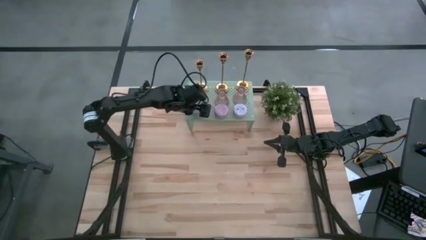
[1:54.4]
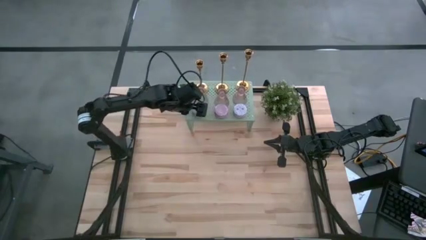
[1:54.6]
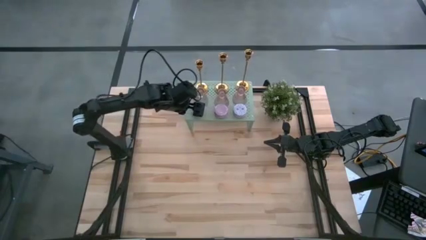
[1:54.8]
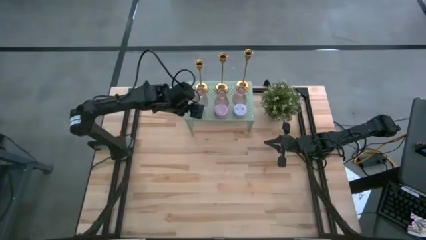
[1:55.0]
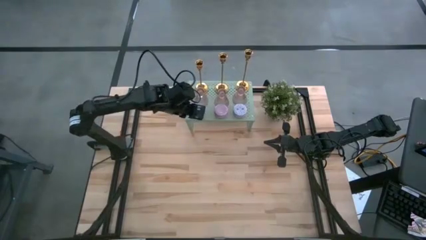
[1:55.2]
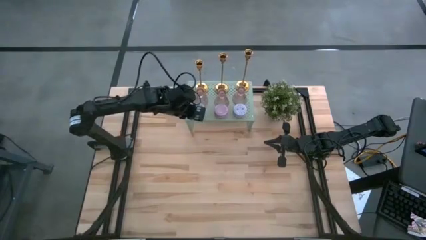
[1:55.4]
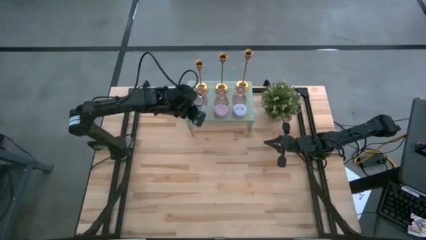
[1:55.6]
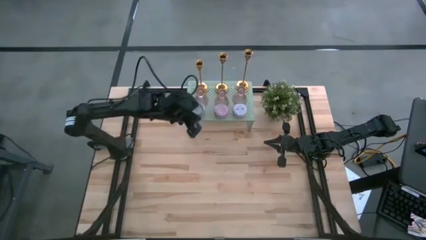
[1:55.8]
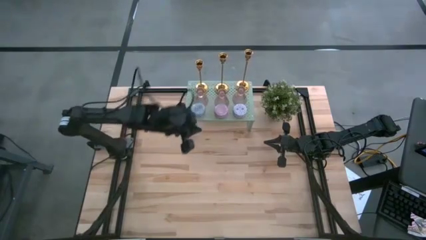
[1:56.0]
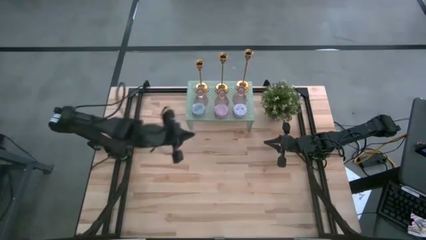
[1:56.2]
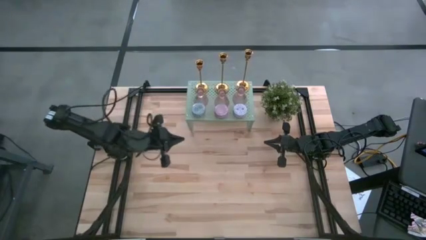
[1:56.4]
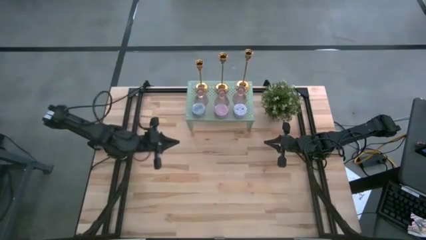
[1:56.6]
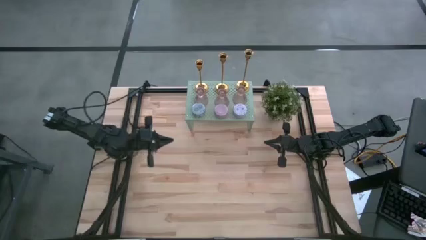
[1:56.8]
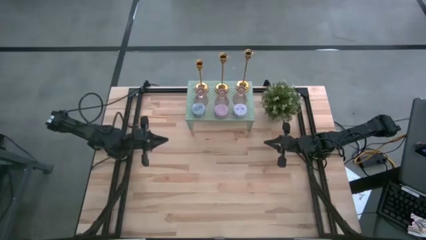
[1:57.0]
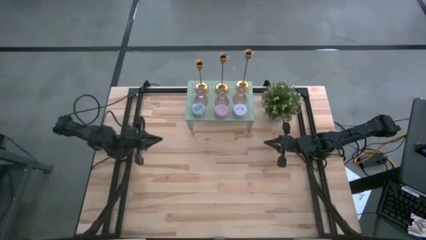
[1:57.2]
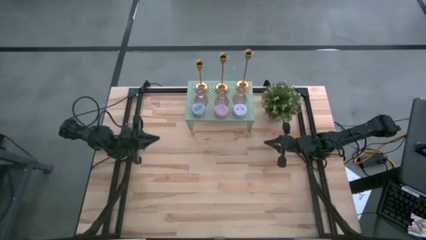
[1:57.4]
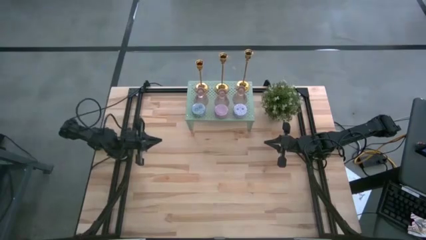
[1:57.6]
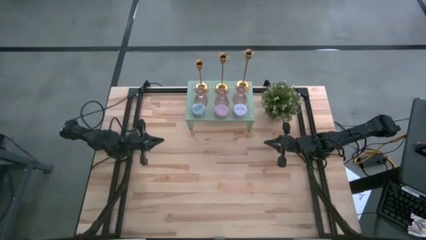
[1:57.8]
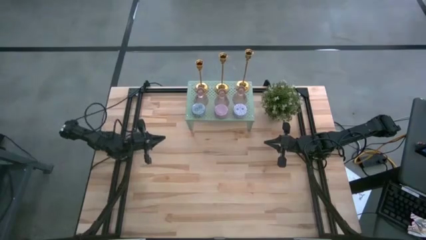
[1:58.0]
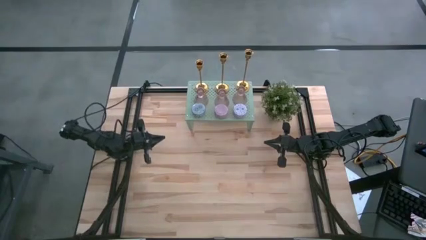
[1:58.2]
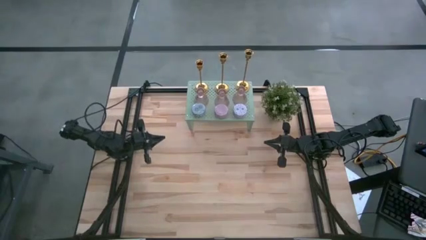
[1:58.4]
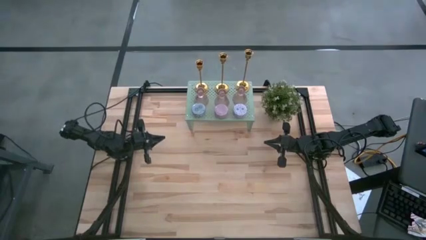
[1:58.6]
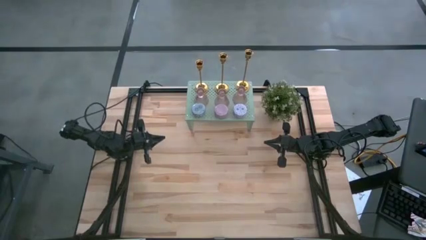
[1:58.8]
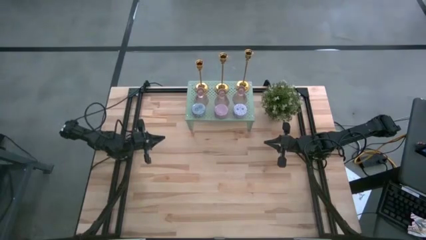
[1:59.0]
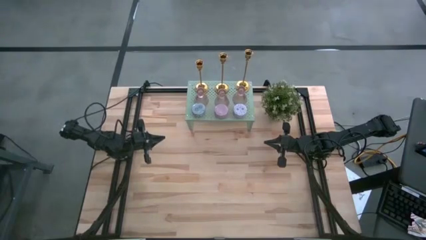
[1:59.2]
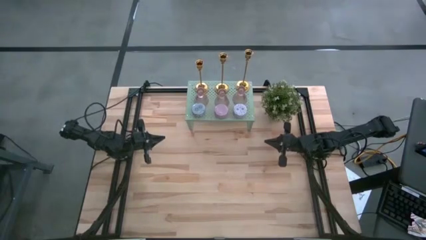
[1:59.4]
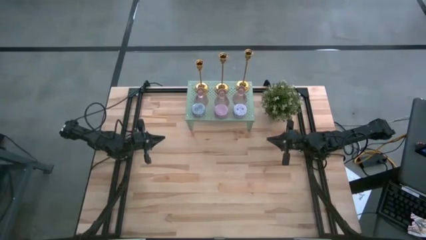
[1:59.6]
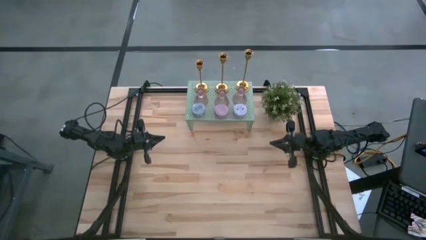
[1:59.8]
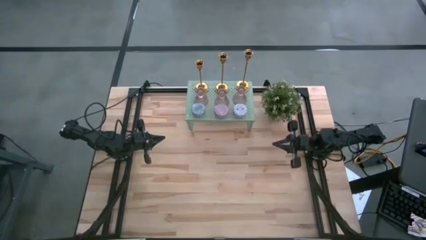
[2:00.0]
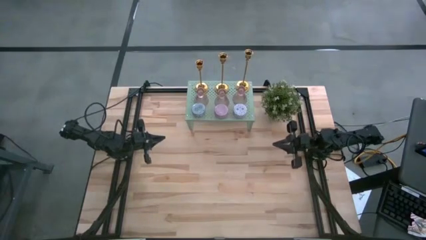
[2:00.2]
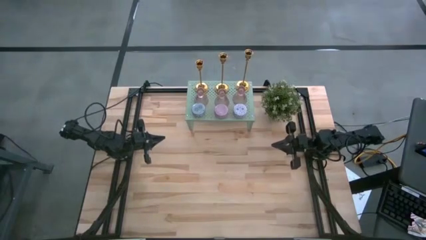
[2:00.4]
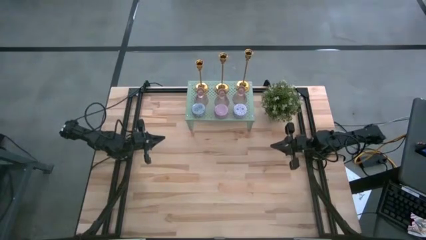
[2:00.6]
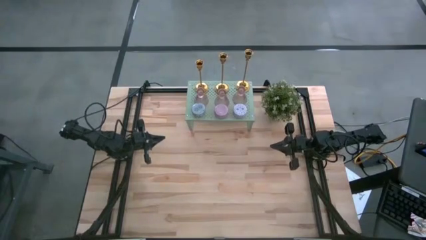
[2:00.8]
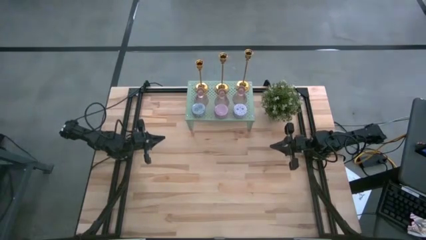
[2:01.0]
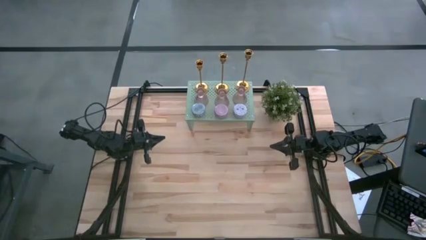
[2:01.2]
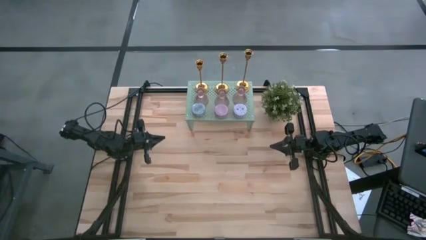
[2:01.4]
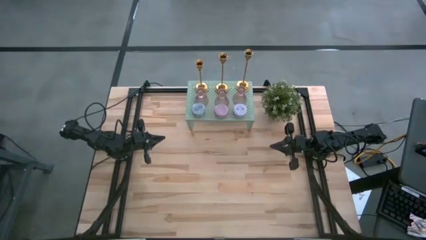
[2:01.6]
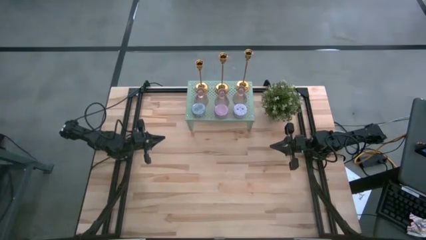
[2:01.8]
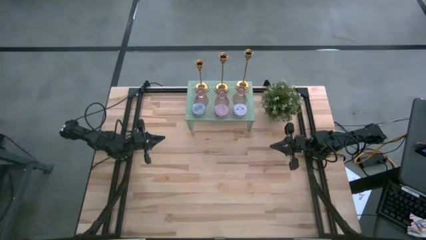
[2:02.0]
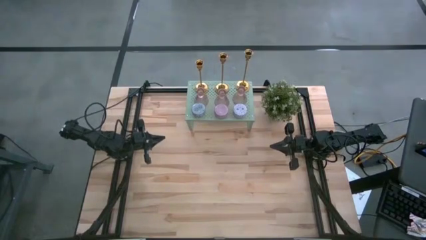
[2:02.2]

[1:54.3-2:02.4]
Task: Pick & Place candle stick holders
Return to Home Position
